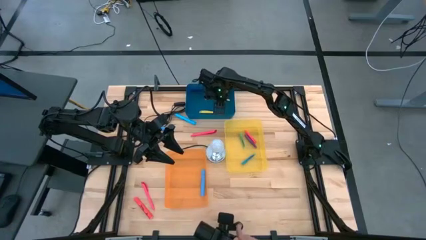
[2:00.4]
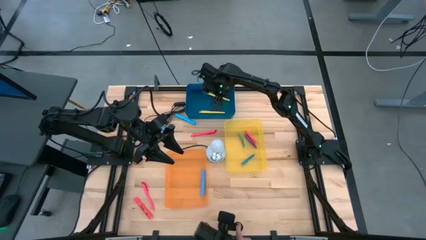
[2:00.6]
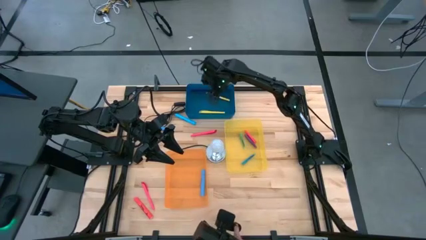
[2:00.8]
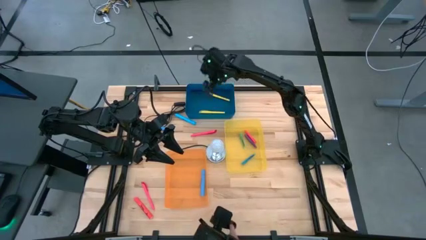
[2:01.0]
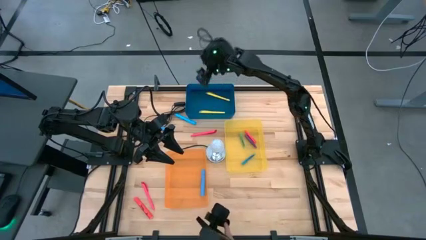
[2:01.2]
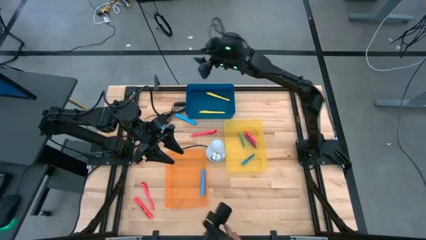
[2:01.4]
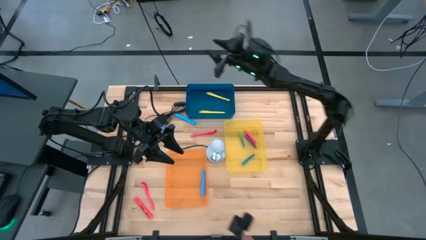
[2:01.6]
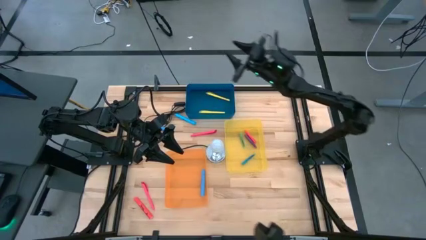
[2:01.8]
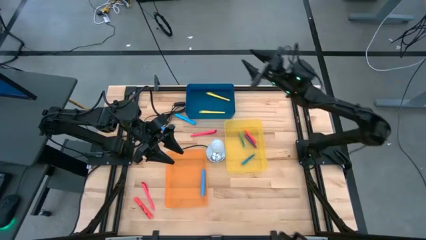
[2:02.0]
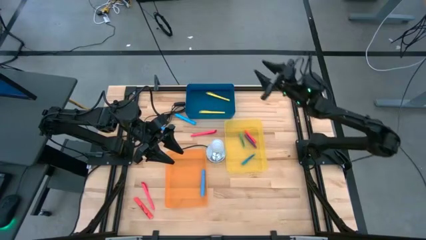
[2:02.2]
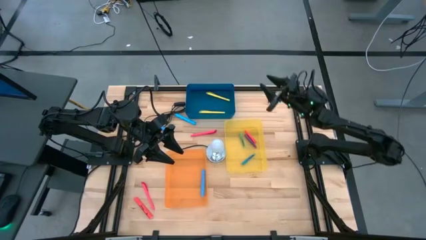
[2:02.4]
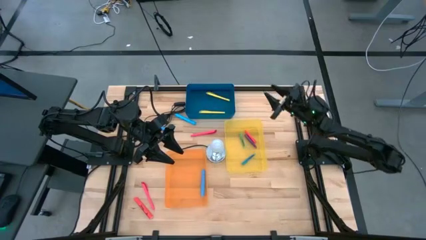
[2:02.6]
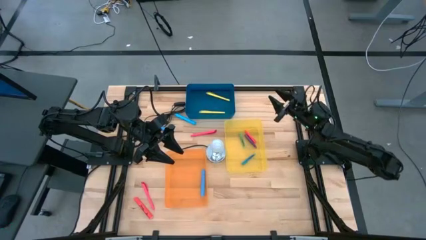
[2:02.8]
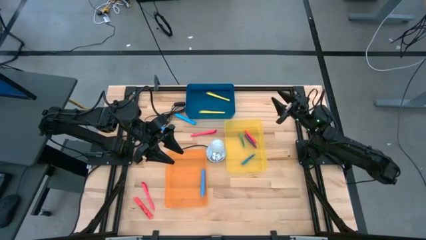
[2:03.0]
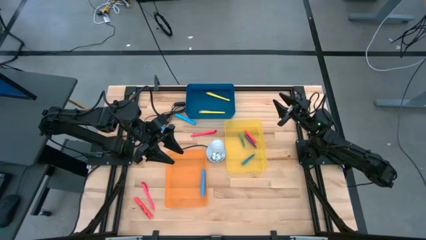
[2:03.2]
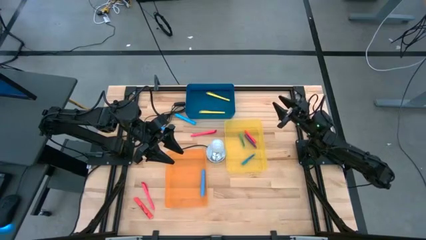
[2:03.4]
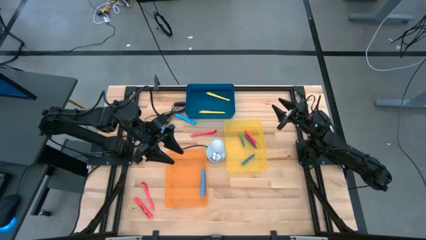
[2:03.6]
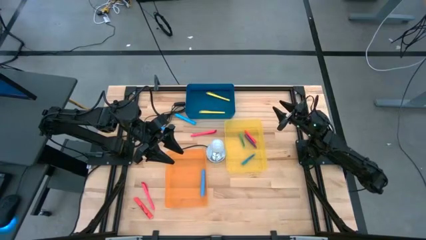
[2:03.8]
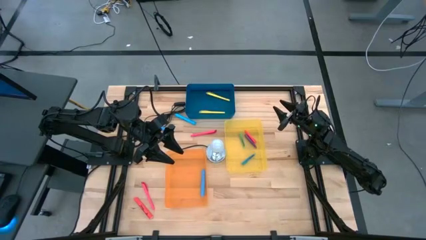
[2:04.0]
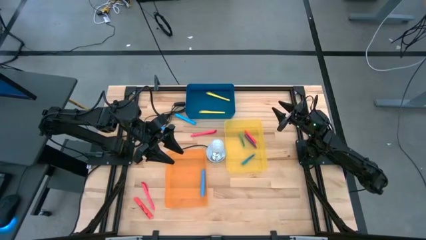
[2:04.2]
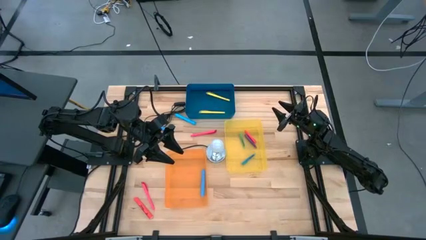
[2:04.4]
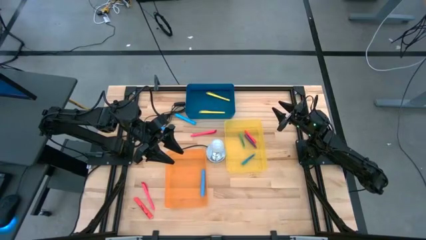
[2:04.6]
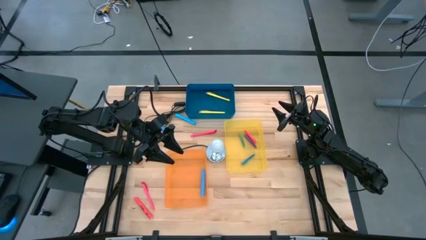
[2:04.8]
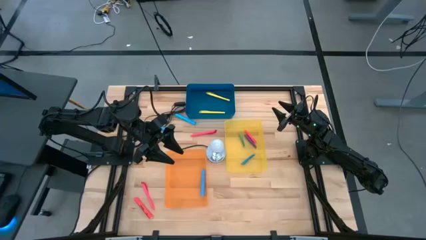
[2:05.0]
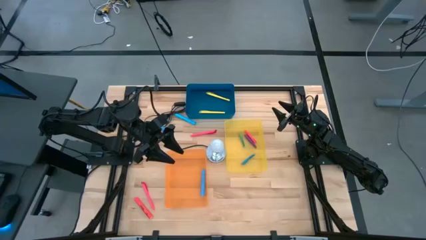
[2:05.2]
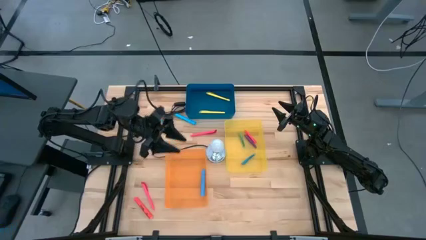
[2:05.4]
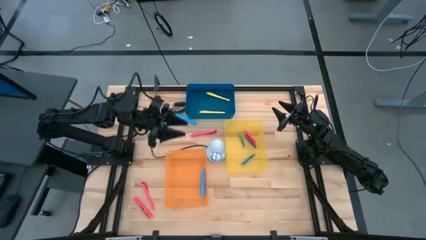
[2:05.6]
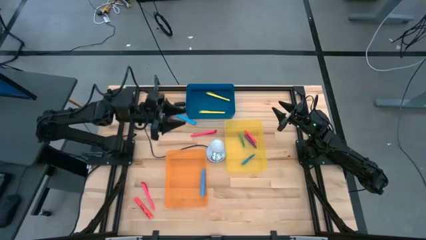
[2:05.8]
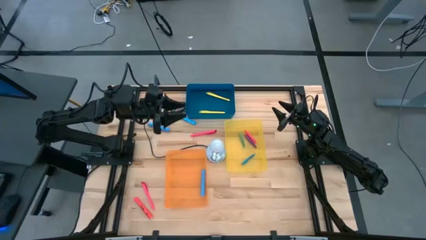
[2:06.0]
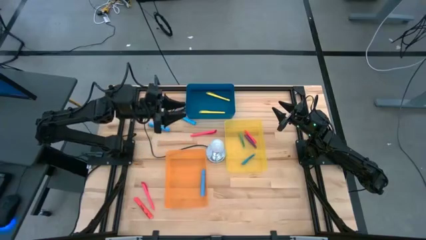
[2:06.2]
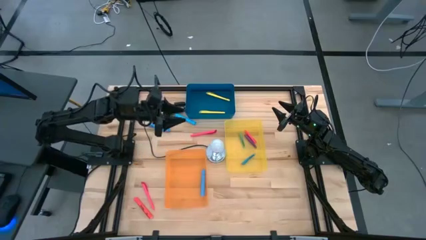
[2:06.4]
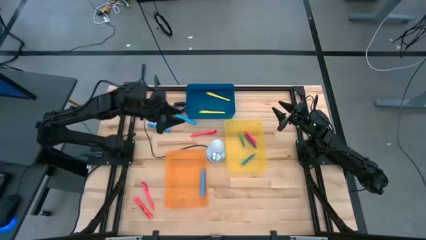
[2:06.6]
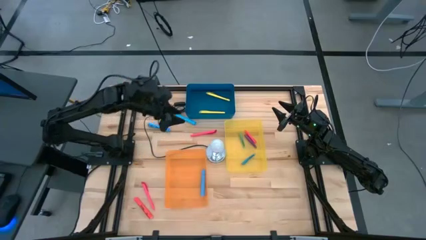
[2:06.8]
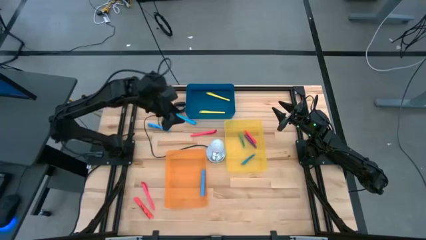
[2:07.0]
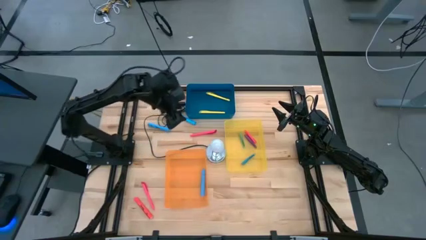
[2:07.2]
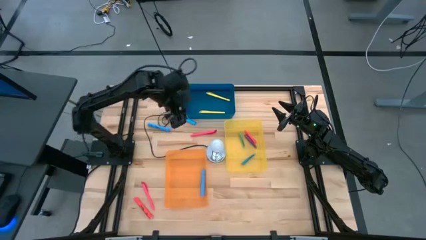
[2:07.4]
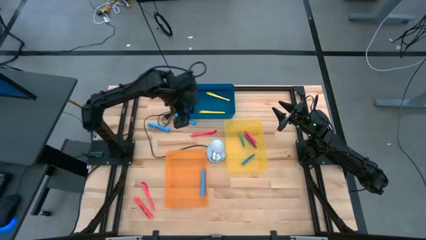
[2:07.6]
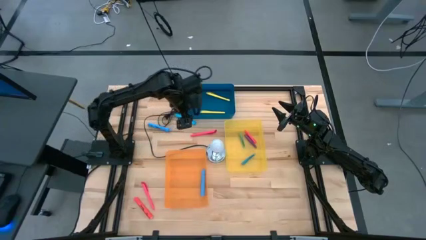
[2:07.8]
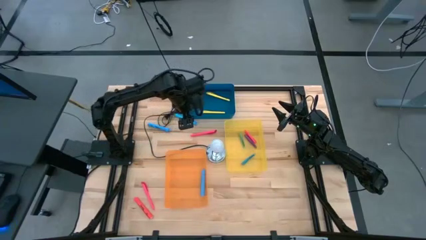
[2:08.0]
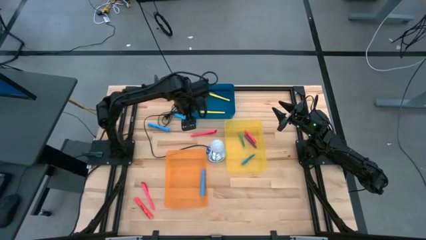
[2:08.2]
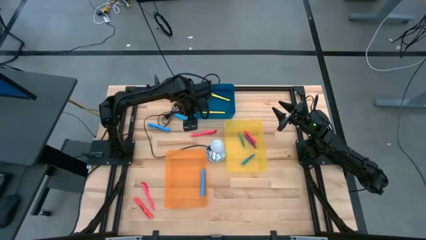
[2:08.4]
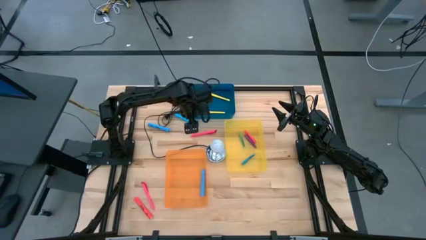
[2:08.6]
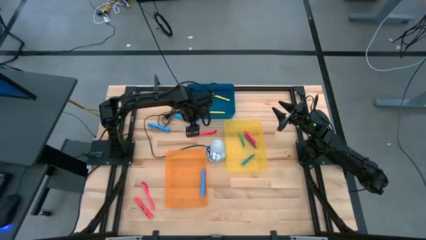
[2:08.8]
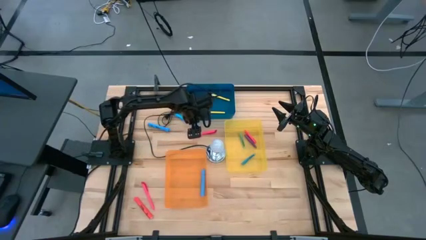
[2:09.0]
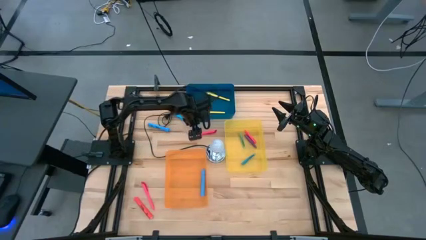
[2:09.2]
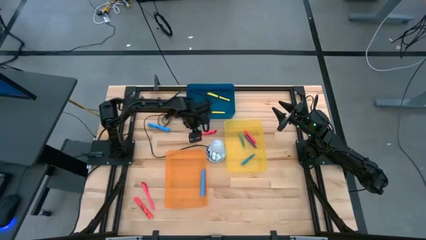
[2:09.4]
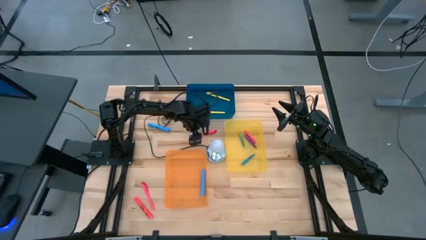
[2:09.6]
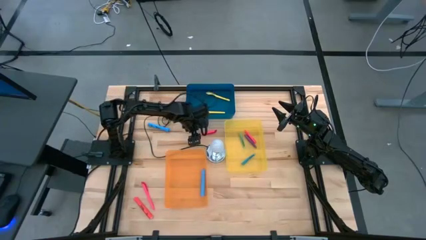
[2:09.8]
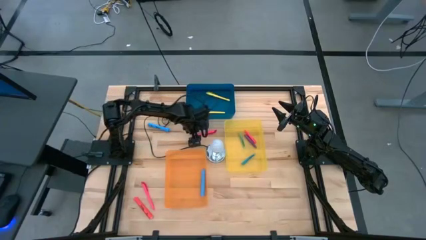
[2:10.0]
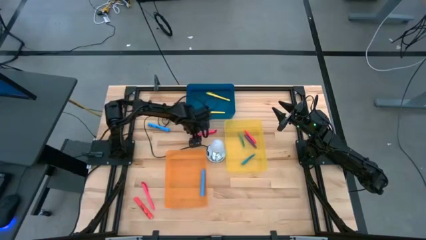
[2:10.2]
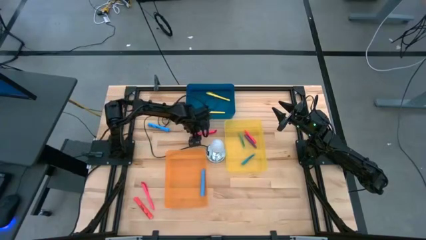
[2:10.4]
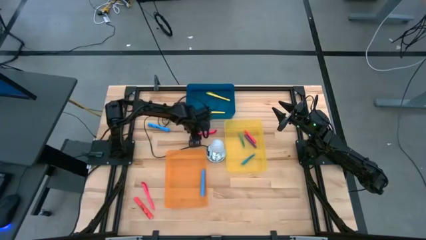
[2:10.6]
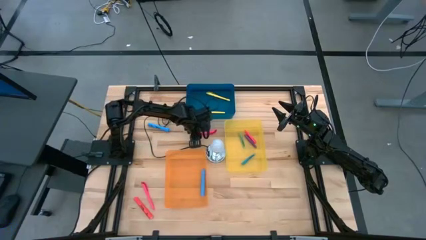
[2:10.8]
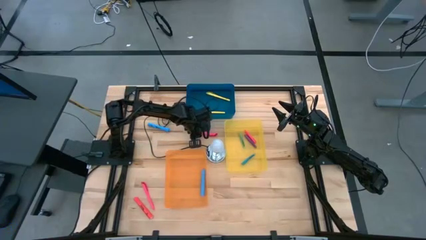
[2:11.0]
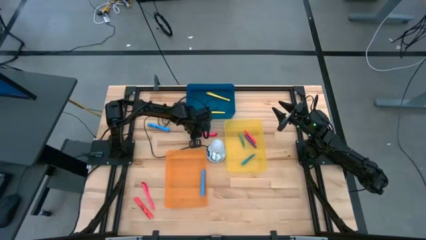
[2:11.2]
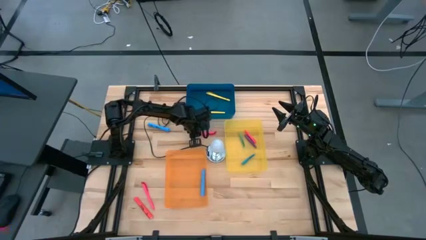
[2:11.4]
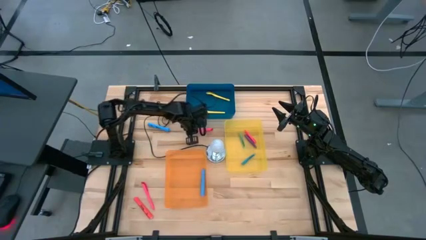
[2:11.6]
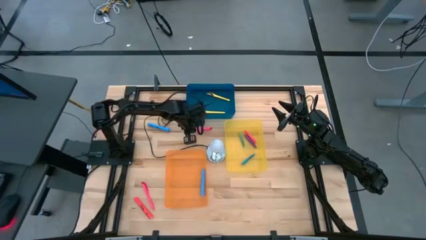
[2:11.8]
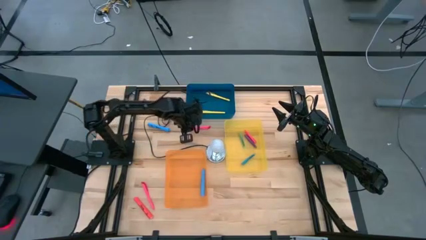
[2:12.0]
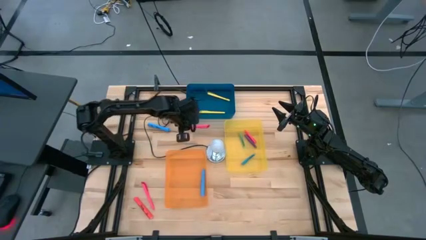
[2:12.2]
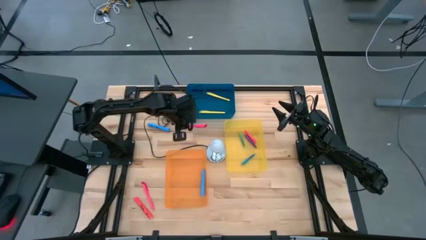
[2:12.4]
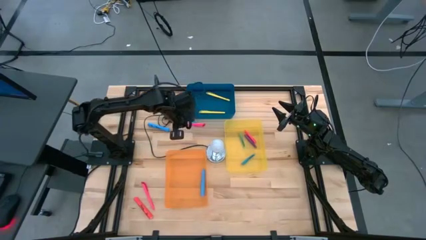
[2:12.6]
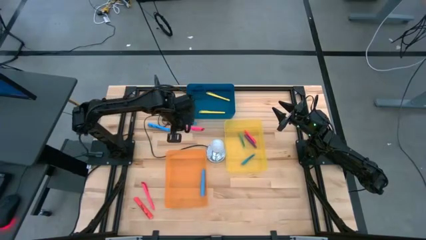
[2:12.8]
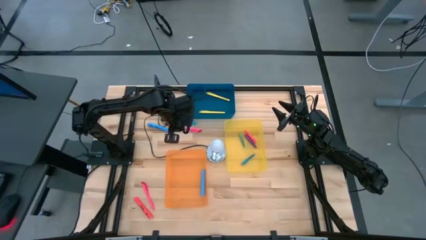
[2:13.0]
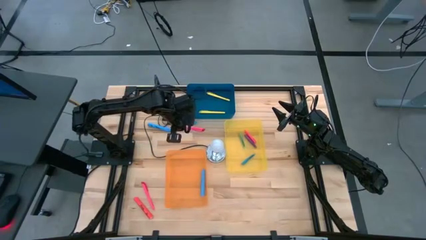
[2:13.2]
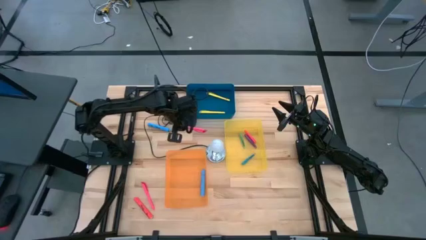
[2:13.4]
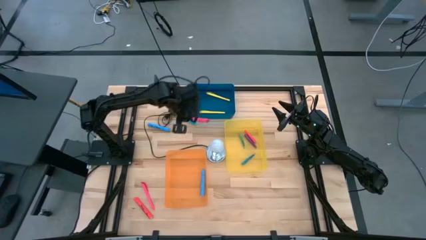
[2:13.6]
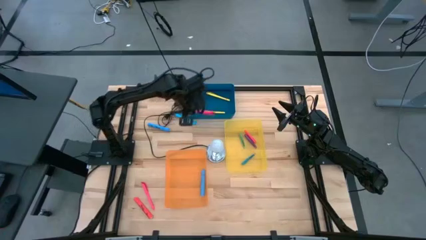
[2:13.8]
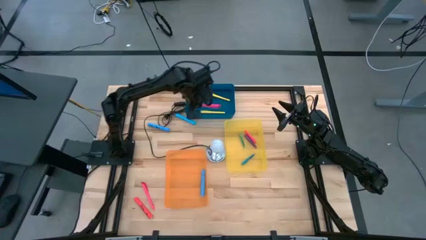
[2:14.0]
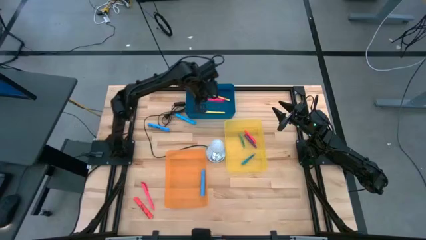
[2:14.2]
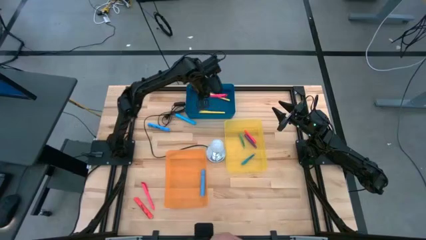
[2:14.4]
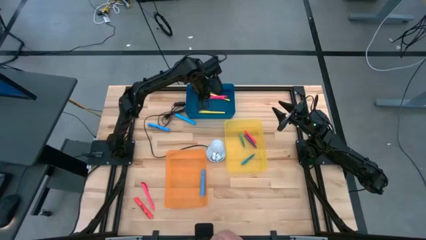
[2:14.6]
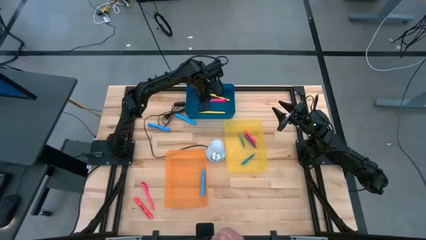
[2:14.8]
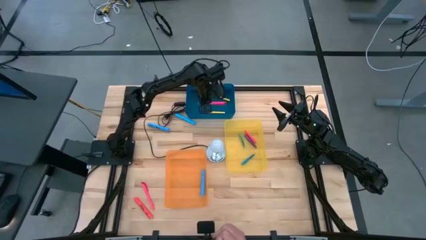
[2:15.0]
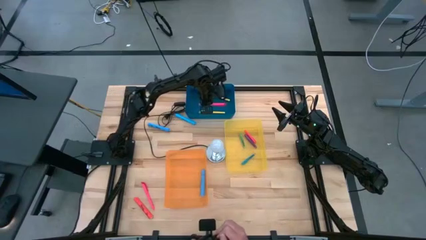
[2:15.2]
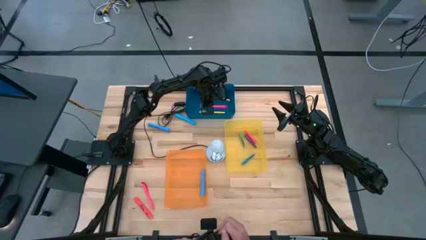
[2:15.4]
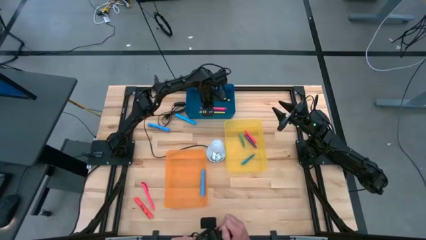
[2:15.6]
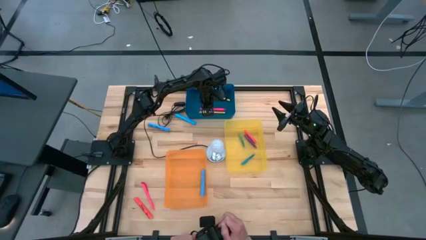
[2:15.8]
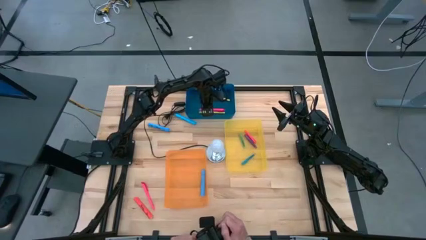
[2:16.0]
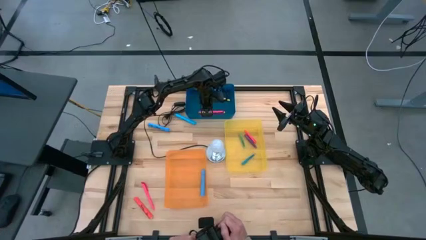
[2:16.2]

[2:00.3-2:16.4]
Task: Pick & Place Markers
Put the top pink pen into the blue bin
